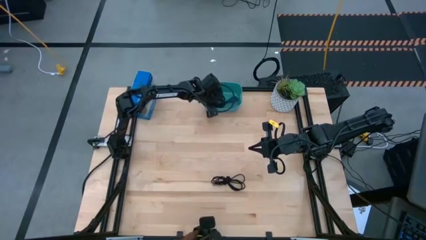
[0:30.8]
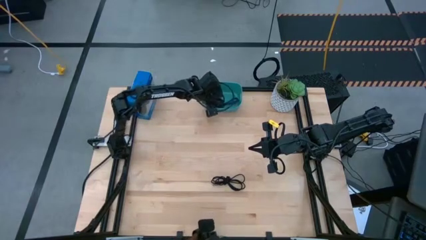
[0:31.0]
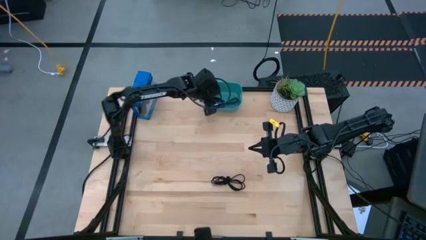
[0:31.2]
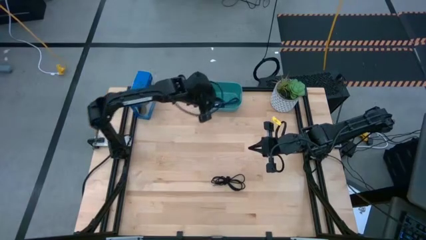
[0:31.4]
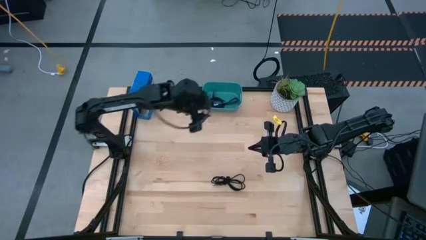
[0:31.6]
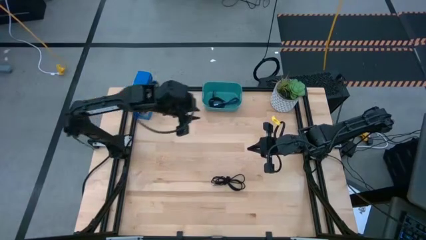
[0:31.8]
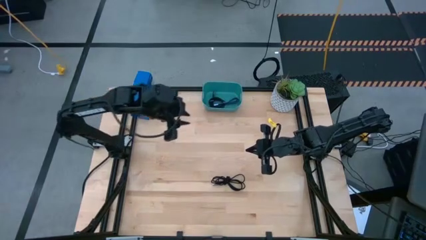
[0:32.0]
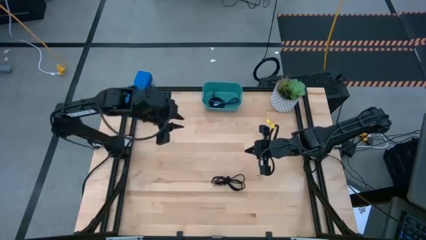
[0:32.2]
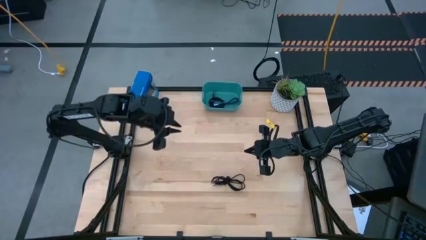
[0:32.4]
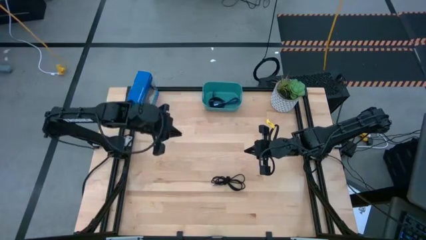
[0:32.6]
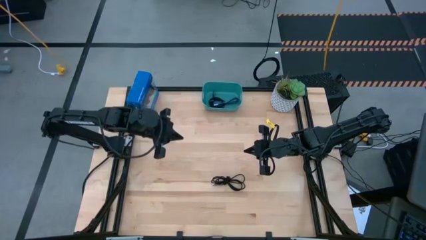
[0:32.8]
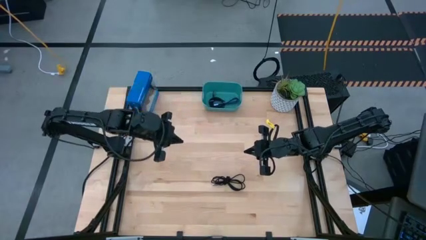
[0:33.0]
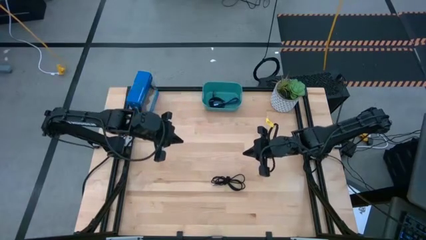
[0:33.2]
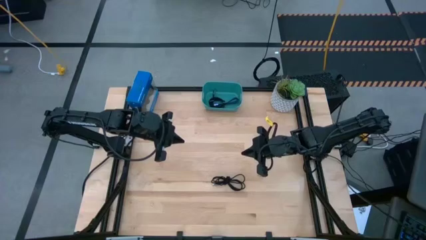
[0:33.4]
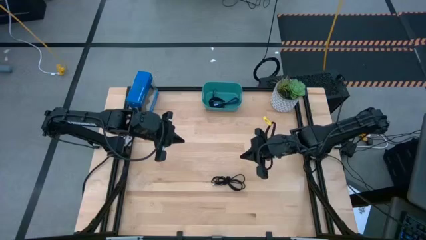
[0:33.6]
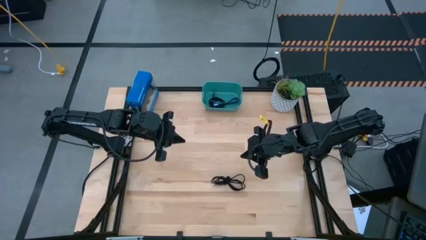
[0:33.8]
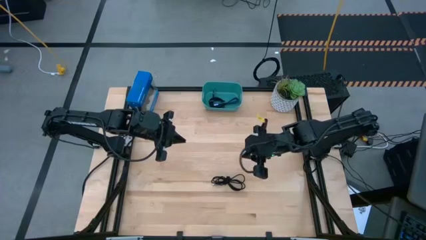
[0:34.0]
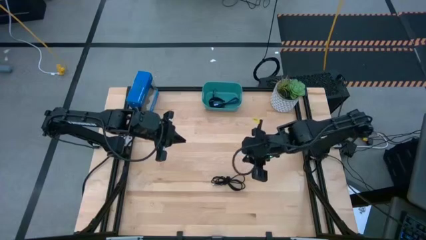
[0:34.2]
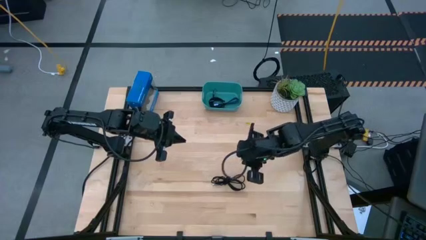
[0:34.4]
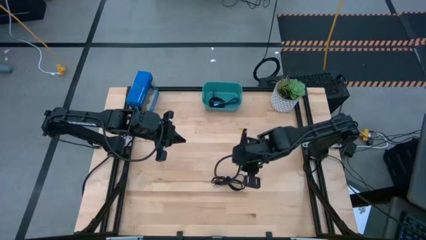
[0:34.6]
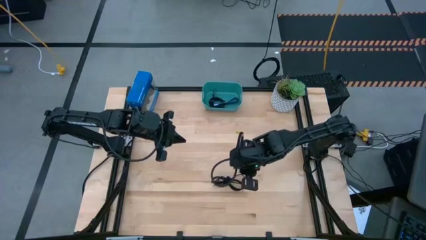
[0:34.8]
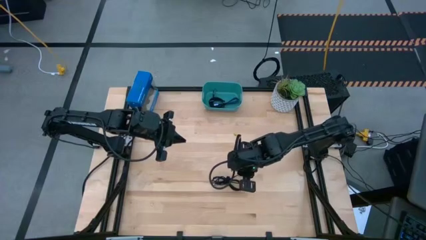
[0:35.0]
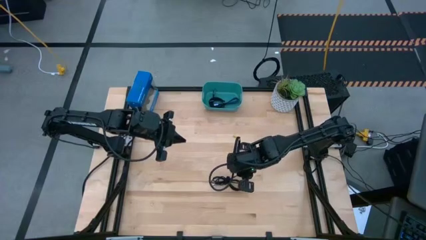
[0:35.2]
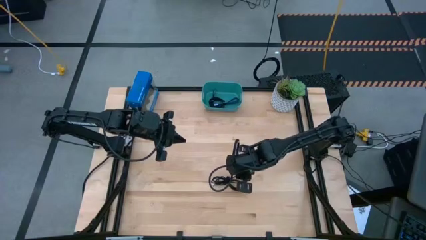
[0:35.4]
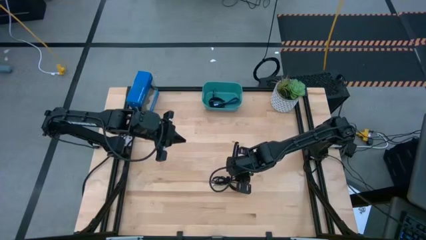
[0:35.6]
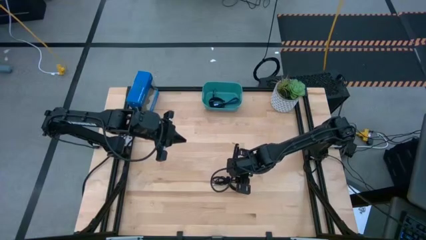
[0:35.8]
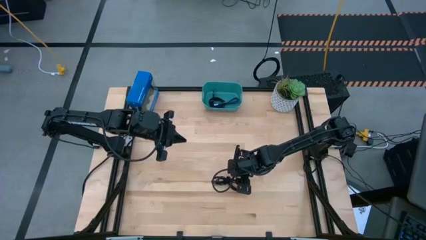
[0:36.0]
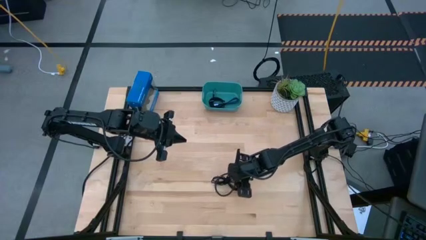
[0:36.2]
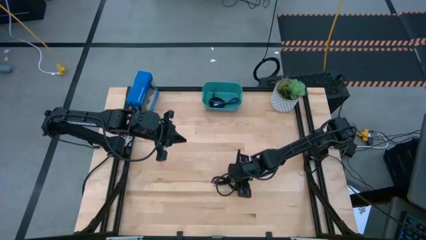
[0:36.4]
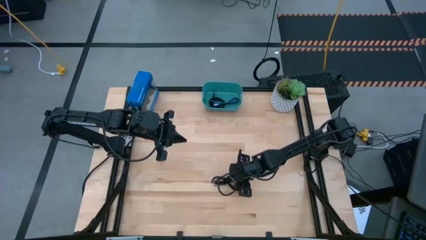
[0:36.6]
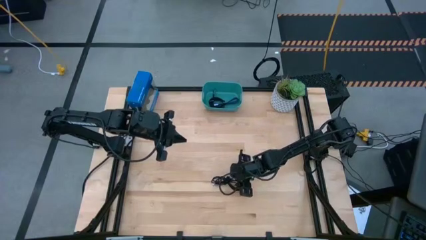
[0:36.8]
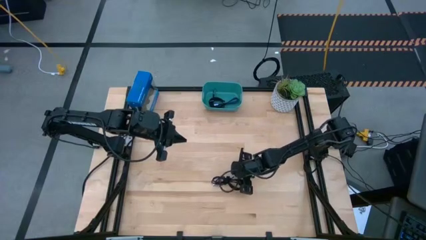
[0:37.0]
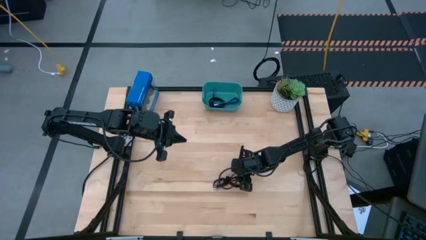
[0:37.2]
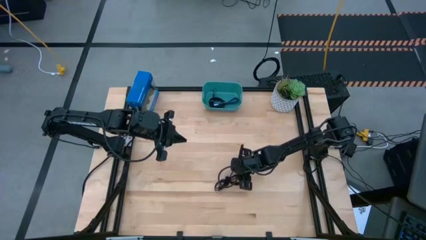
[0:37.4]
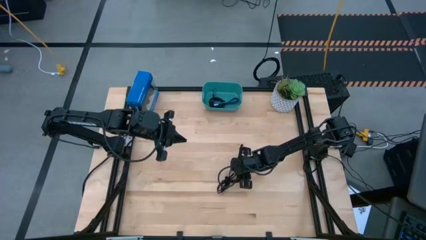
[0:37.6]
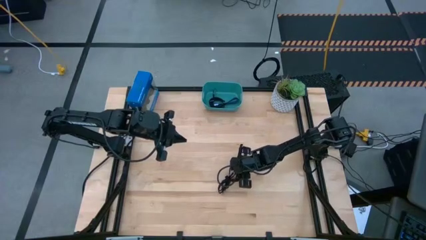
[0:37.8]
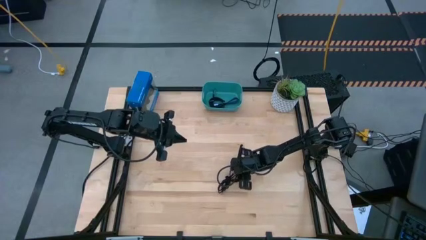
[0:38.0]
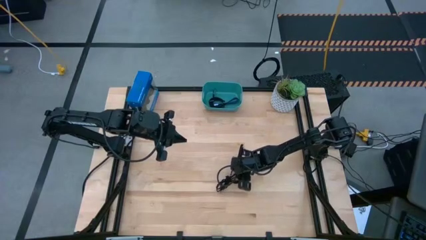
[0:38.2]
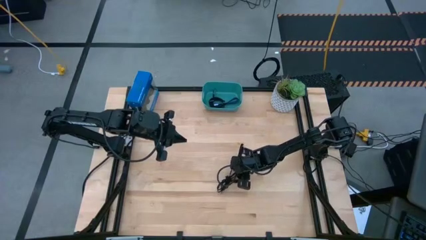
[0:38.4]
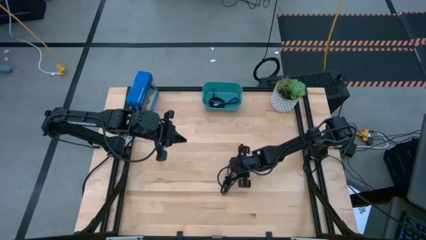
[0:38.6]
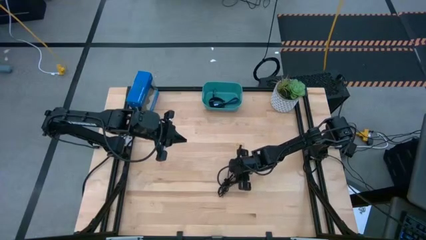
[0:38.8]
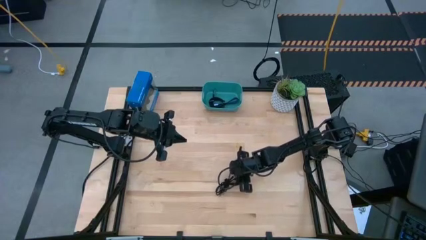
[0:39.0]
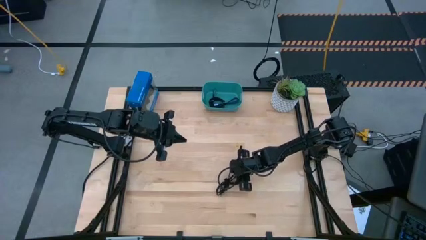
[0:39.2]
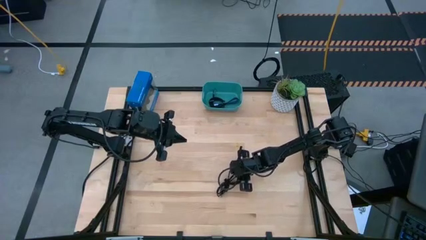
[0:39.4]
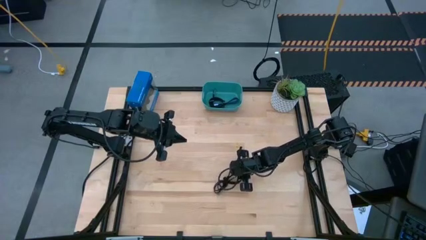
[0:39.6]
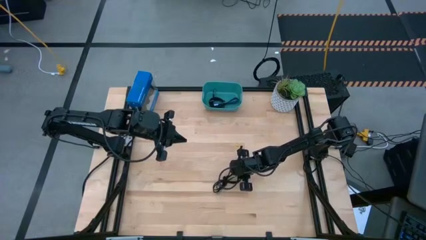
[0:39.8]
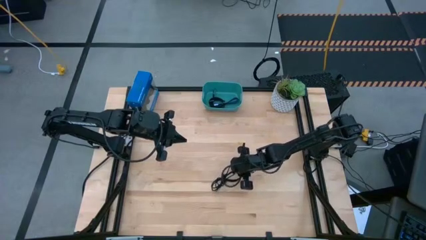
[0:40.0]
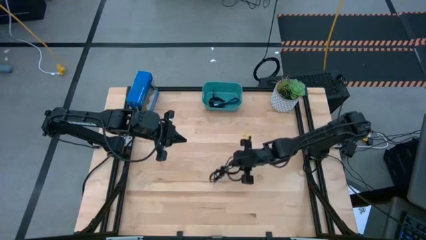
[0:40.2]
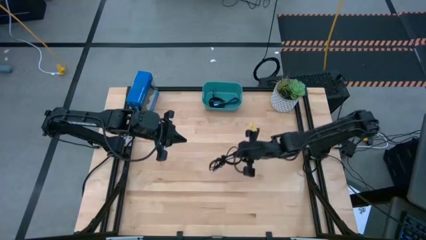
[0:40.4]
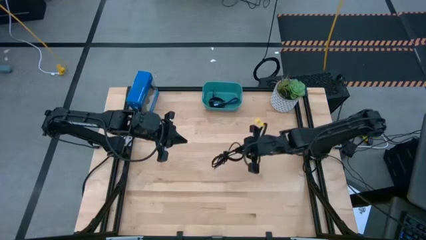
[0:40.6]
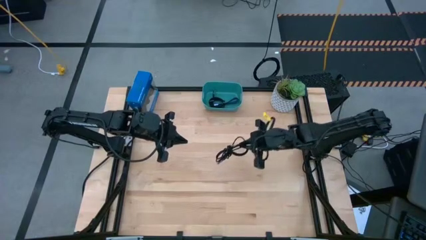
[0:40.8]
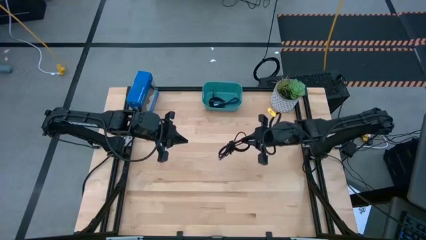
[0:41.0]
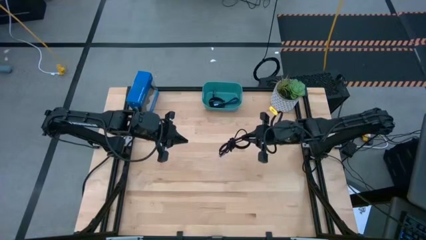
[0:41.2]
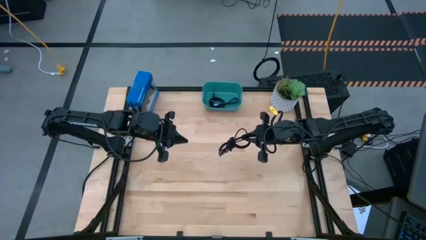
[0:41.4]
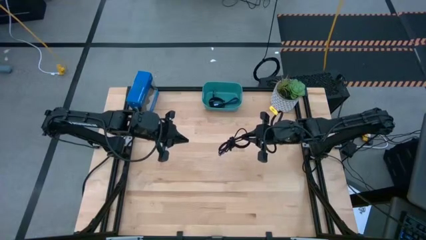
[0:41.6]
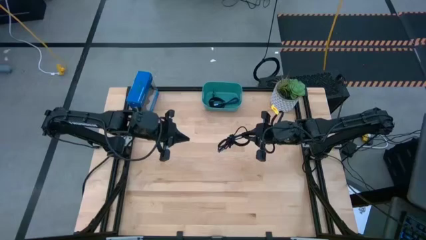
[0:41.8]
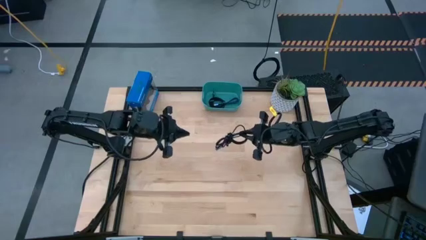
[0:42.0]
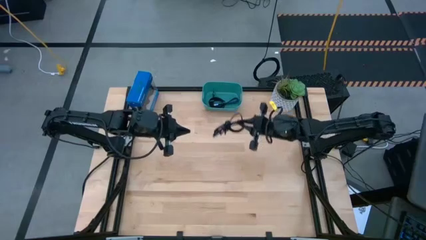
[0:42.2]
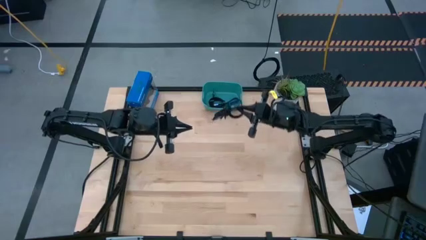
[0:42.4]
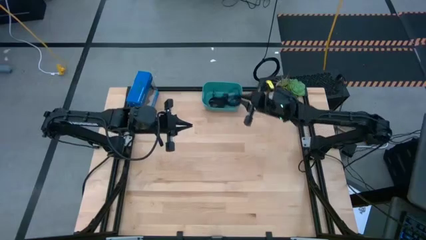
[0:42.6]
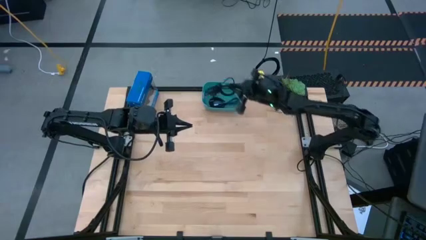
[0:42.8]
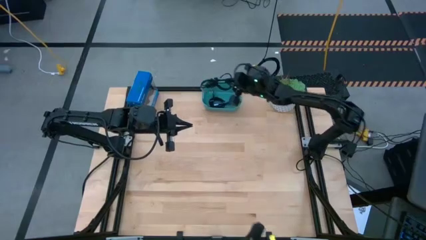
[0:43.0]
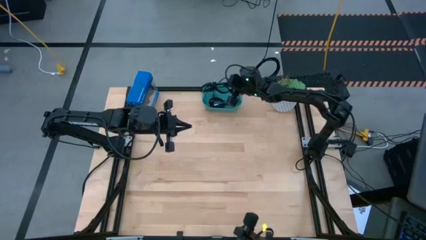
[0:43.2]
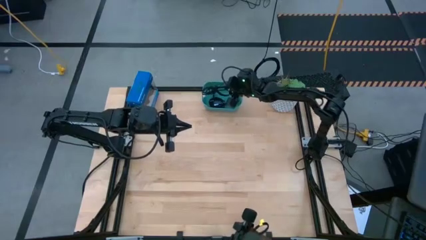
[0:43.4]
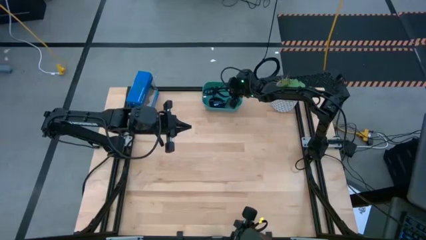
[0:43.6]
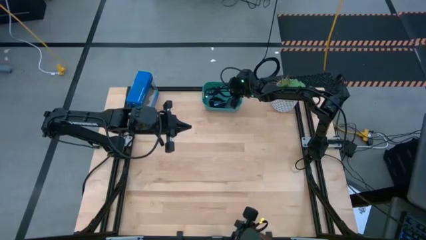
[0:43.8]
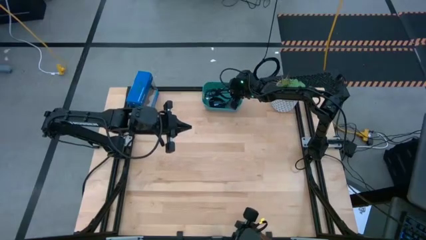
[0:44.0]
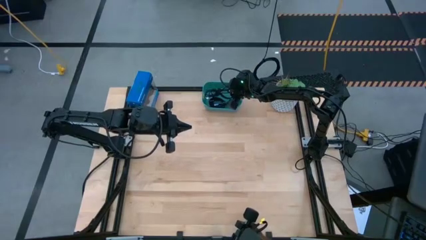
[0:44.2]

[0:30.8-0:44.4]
Task: Pick and place USB-C Cables
Put the black charger cable into the blue bin
